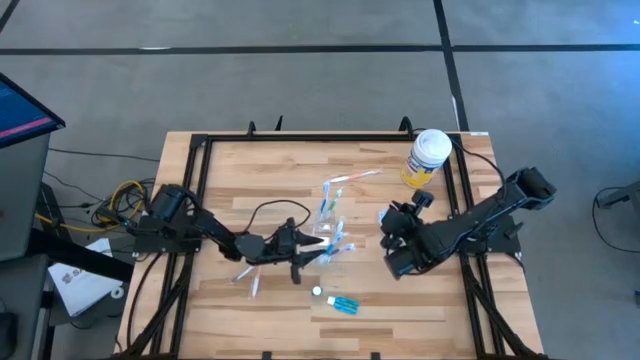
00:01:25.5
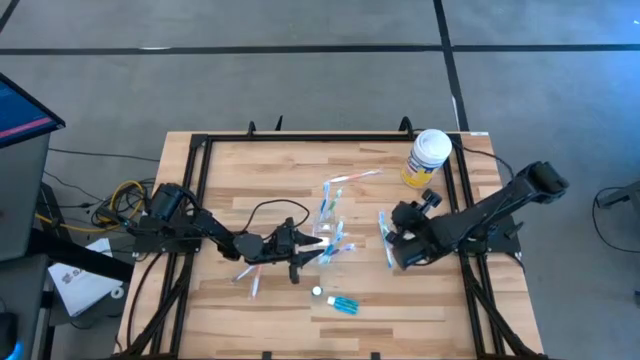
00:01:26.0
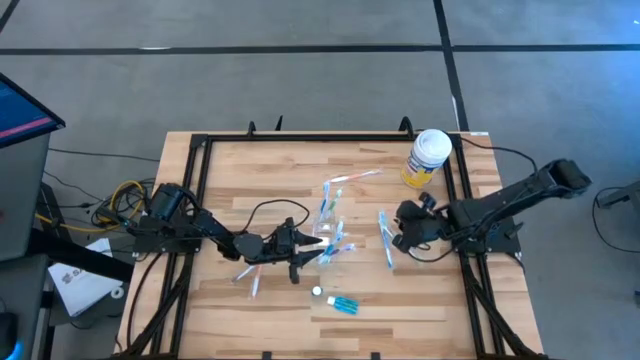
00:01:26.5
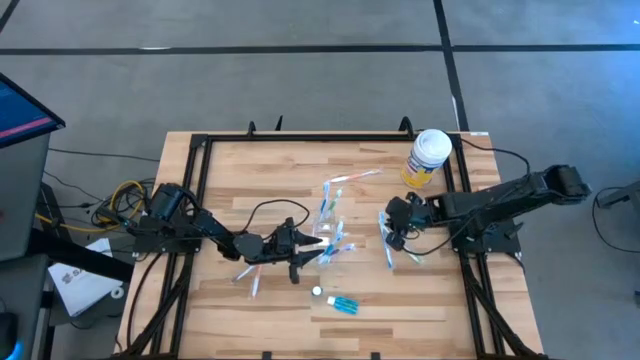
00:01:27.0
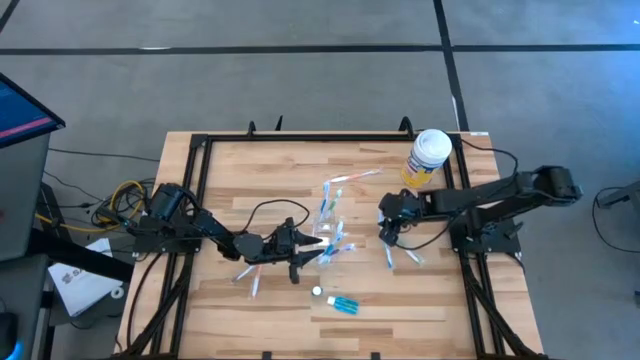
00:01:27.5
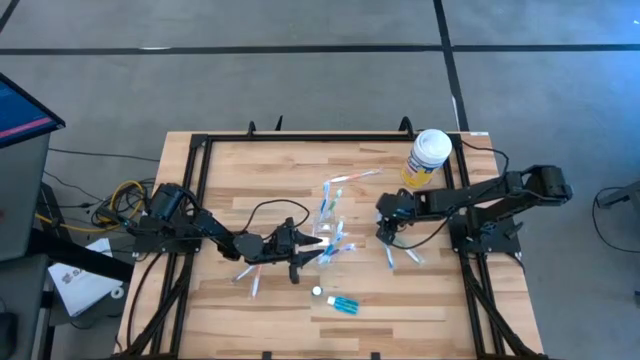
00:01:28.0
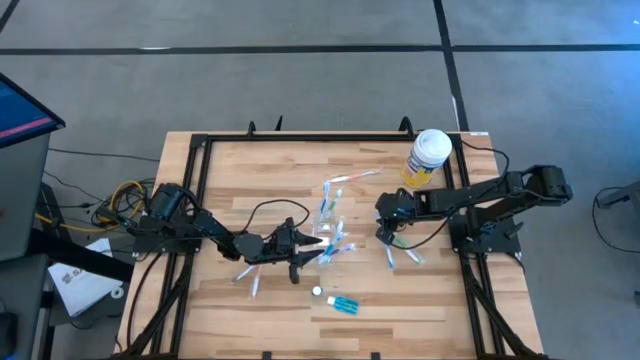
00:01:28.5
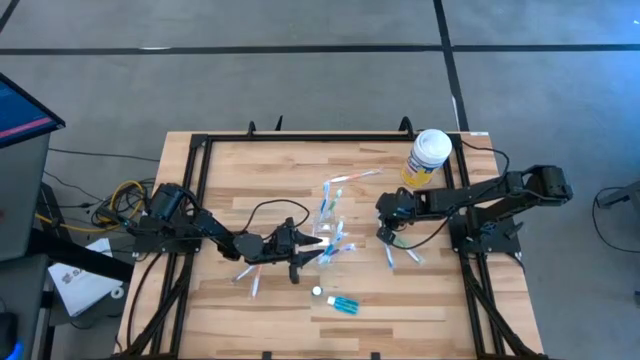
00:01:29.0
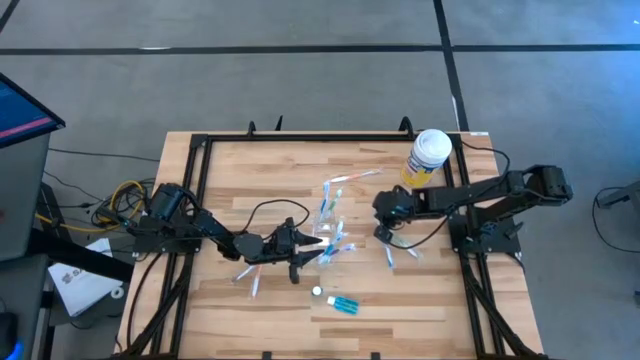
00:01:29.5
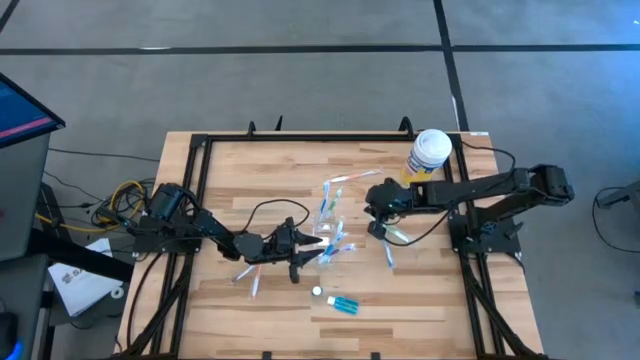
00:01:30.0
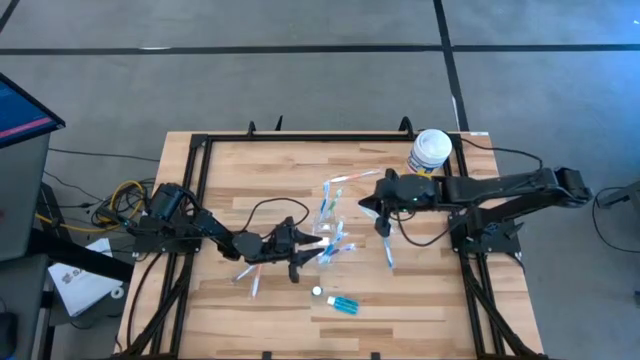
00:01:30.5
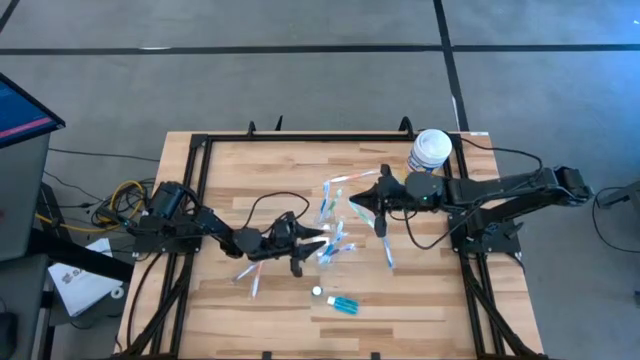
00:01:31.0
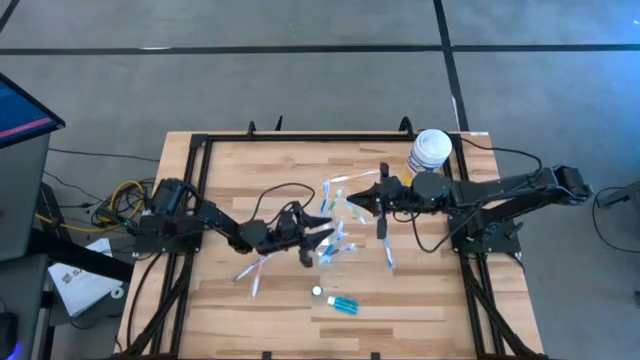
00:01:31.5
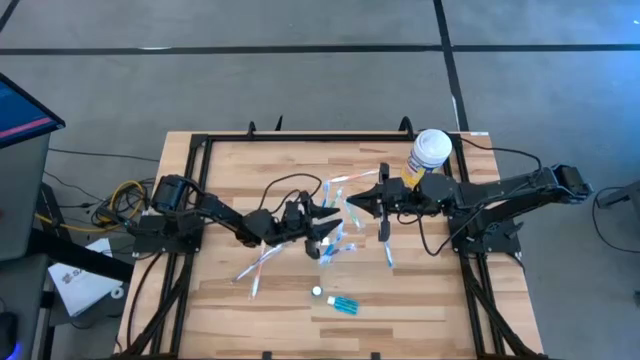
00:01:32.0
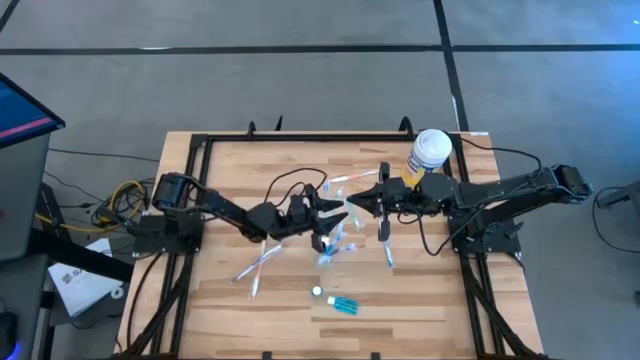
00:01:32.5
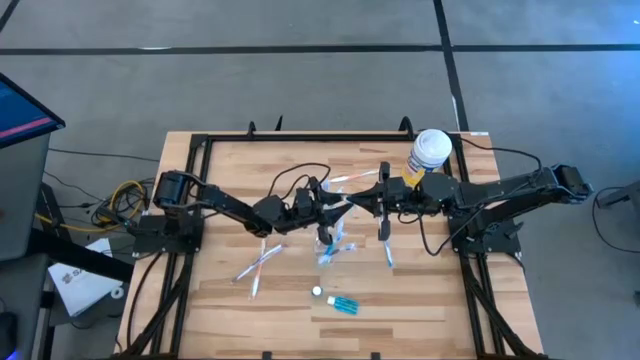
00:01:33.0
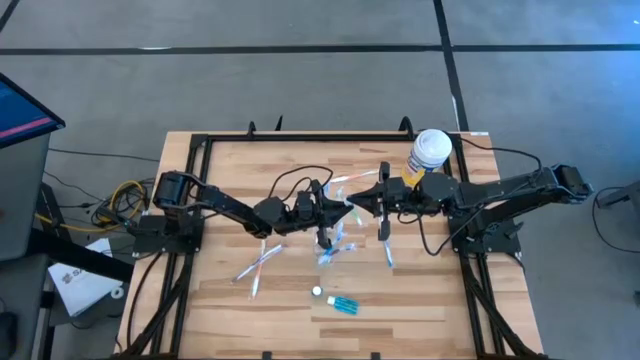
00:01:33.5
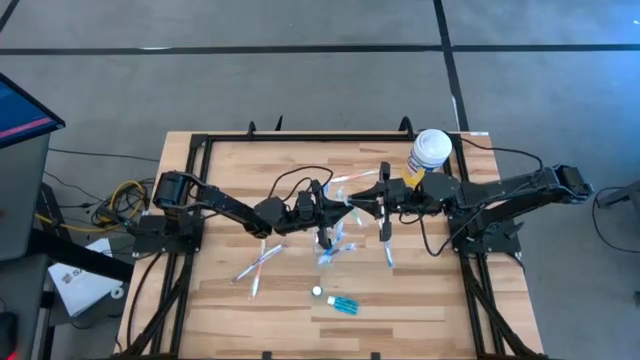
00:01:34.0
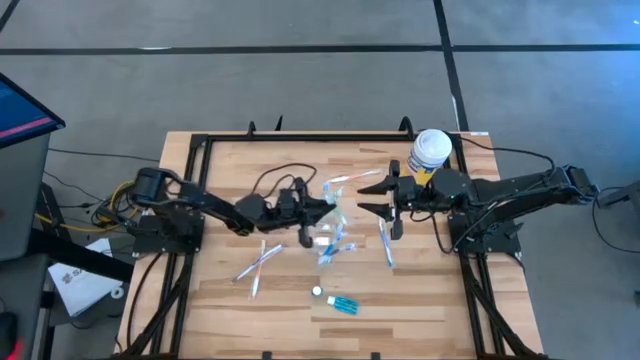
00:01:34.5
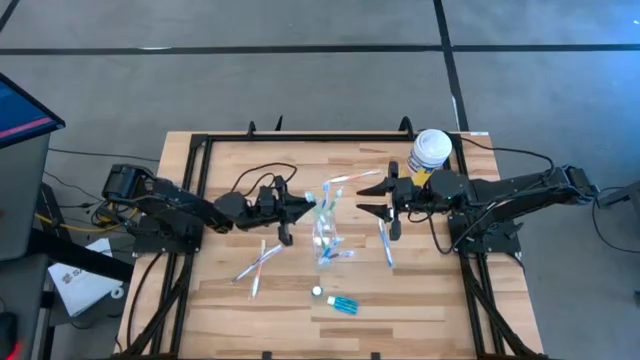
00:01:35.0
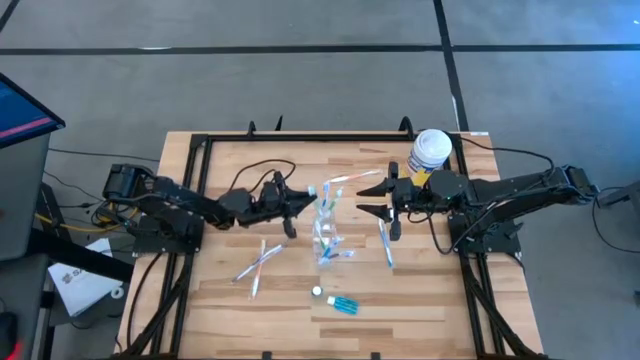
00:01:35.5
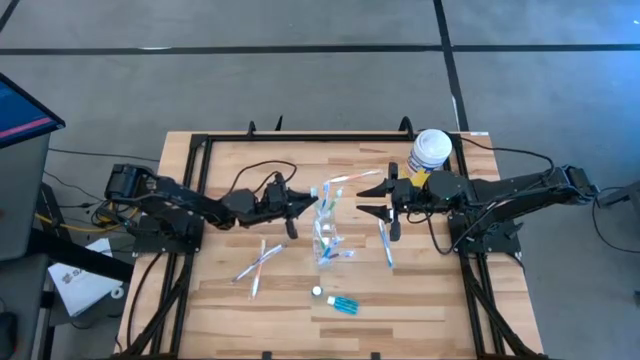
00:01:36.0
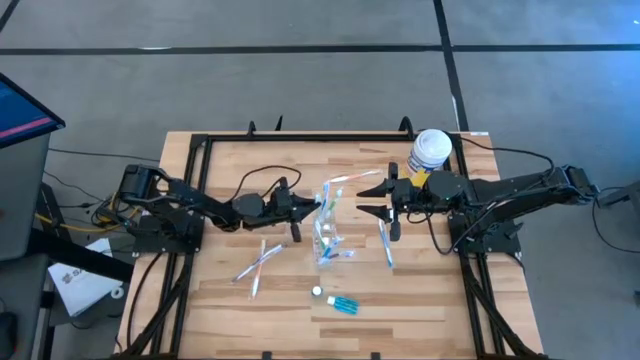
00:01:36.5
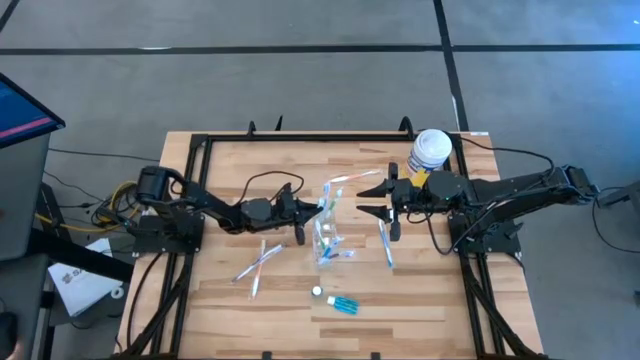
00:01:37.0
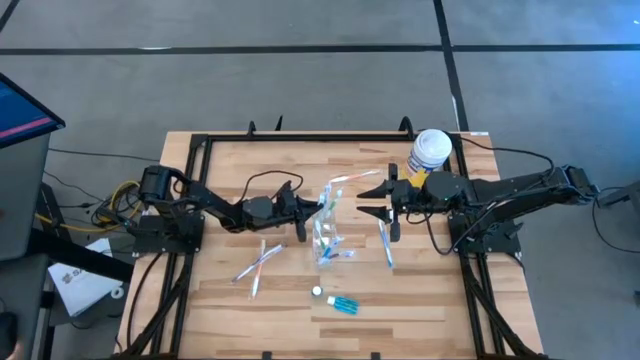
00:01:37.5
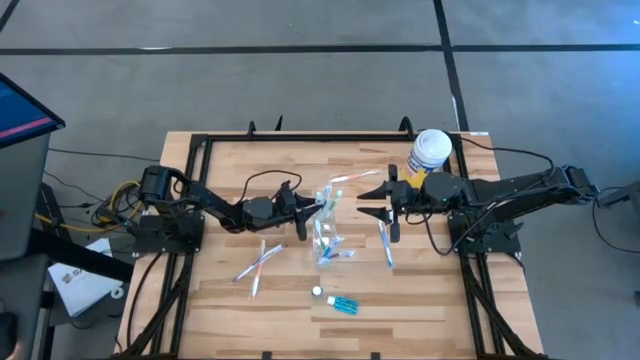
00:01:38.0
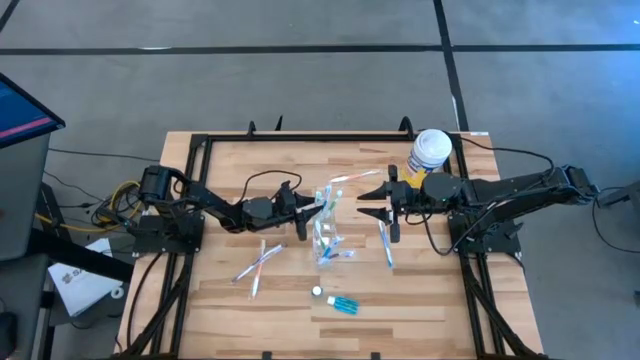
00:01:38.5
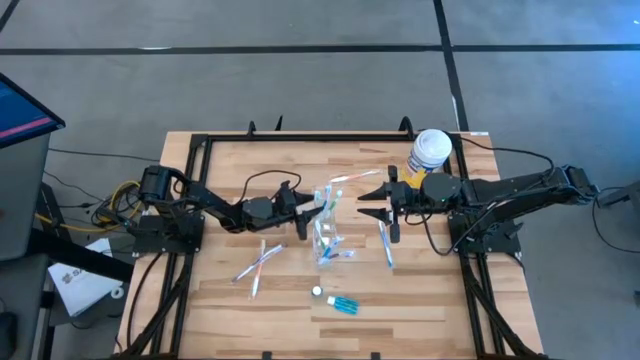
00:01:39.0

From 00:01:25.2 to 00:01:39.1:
Task: Pick & Place toothbrushing station
Put the green toothbrush into the transparent organizer

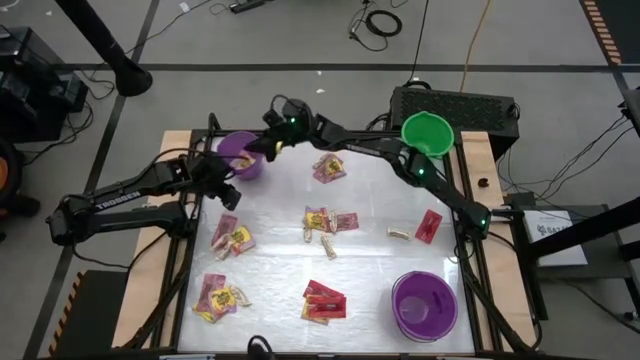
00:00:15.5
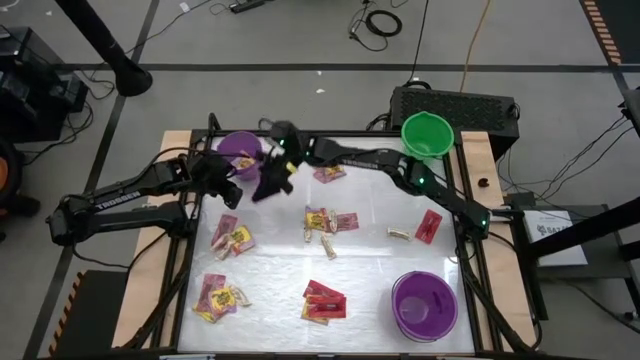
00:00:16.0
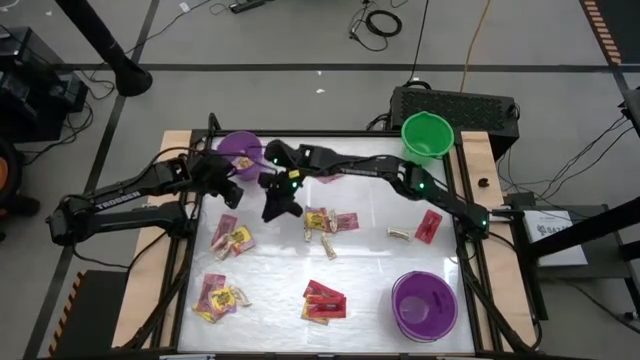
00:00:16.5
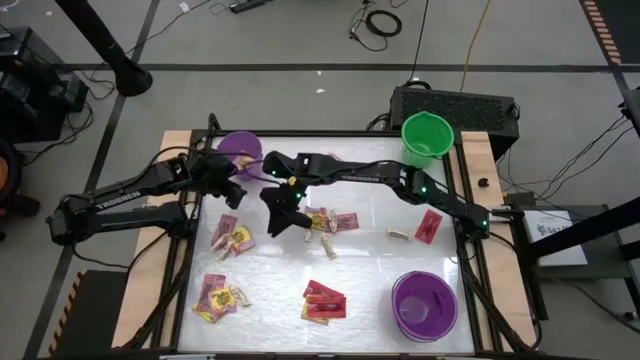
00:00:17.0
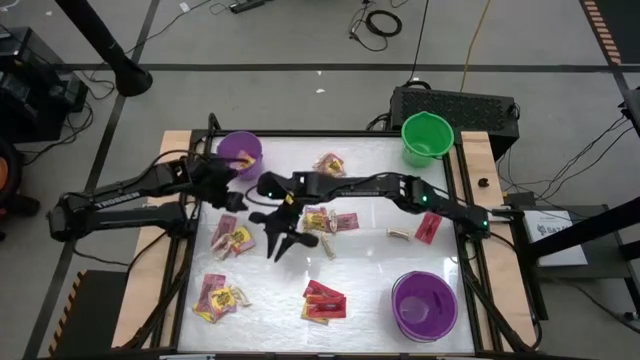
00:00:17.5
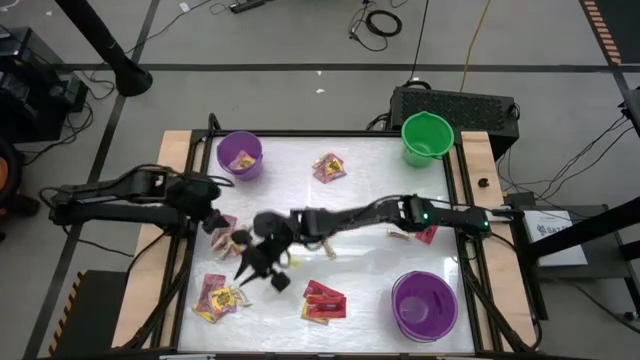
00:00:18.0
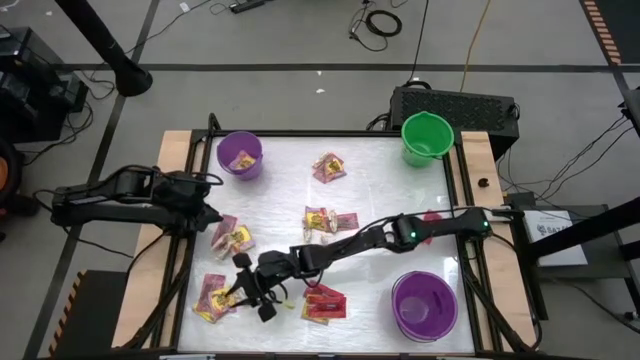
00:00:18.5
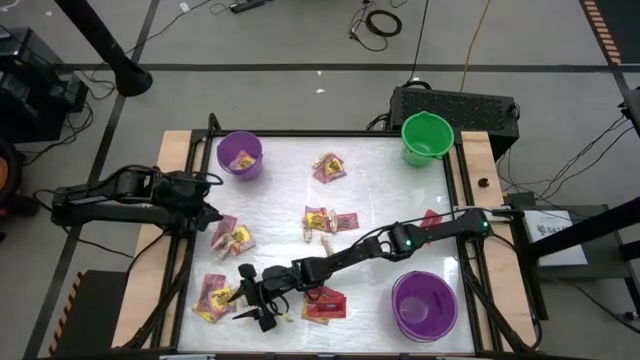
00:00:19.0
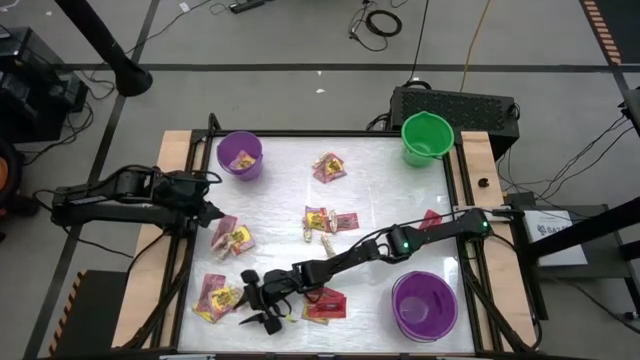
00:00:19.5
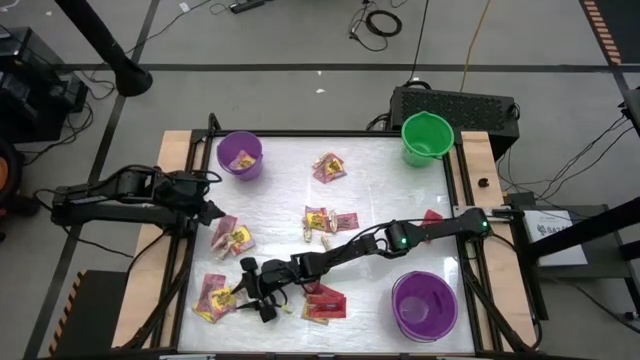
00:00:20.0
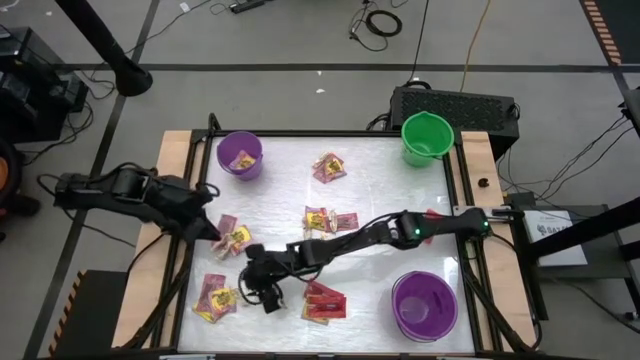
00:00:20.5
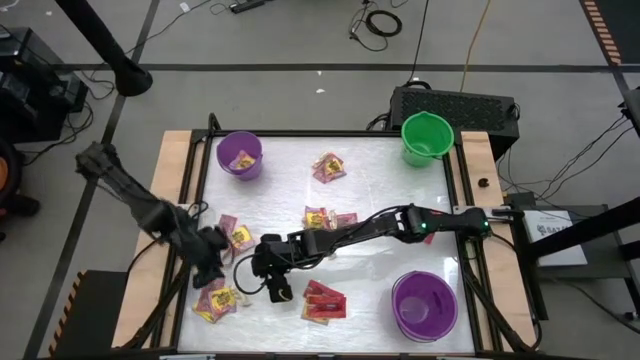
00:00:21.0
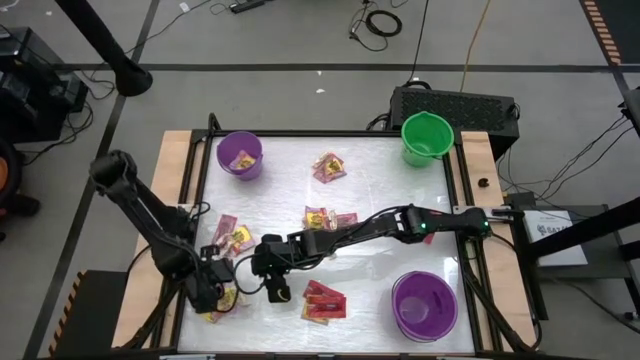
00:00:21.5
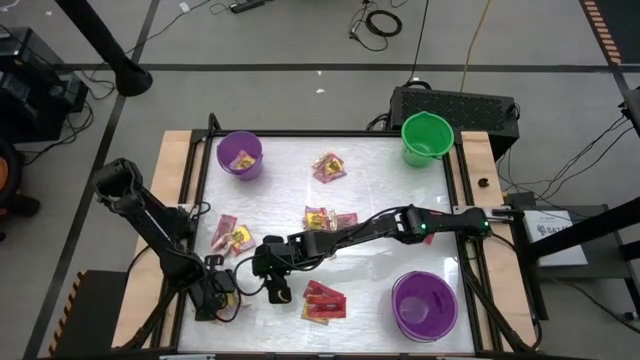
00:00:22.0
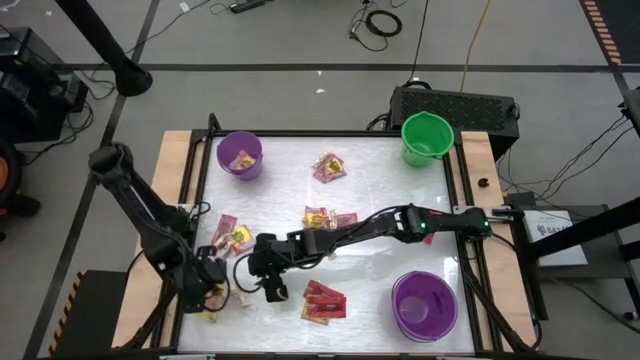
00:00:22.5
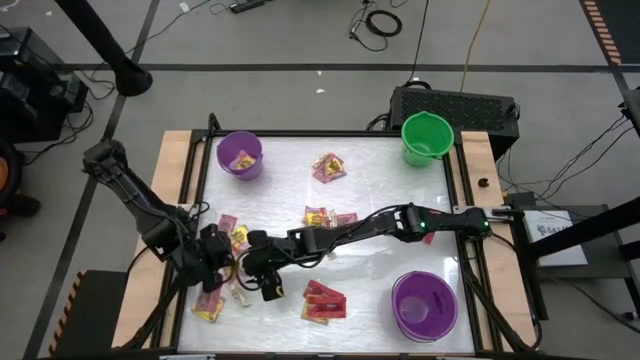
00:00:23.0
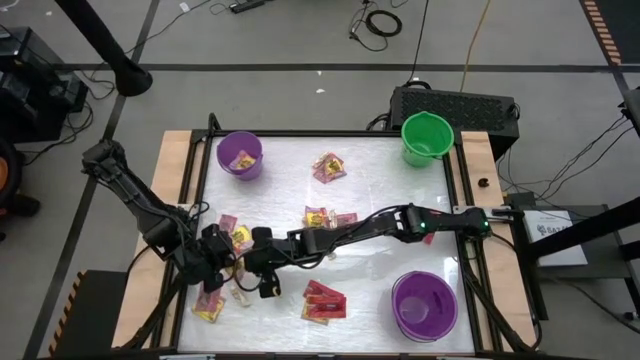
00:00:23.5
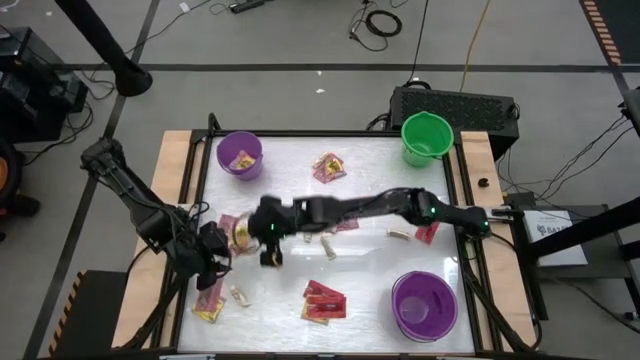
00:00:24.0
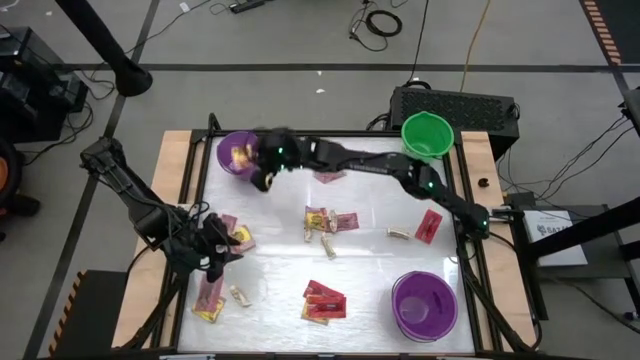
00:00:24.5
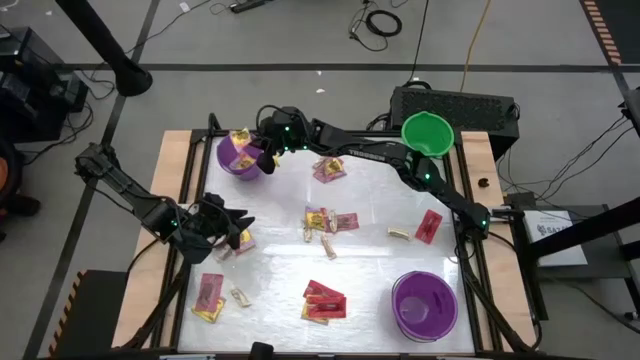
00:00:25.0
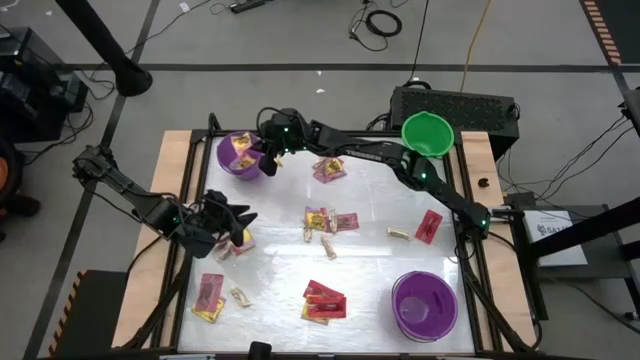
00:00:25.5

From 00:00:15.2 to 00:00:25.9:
Task: Sort candy by brand, put in halloween buckets
Put the yellow candy into the top violet bucket
